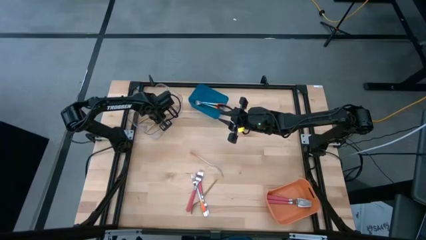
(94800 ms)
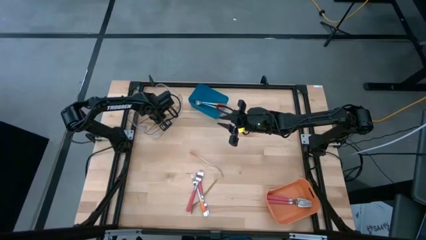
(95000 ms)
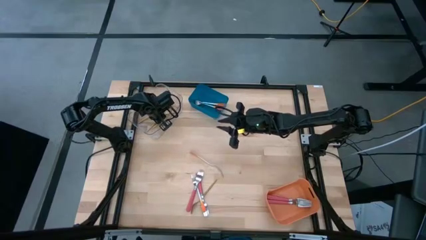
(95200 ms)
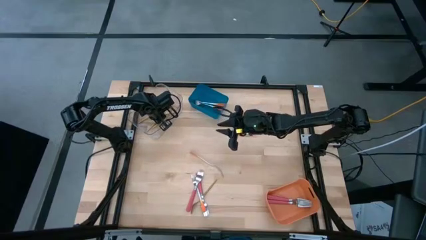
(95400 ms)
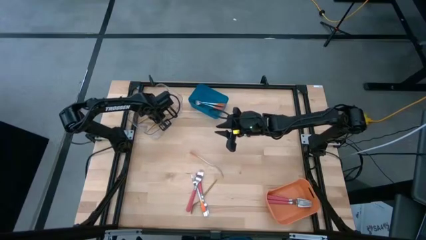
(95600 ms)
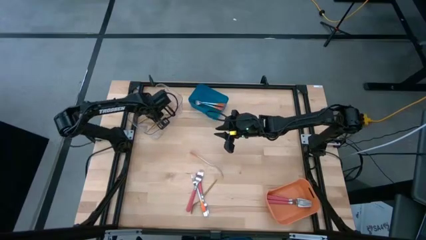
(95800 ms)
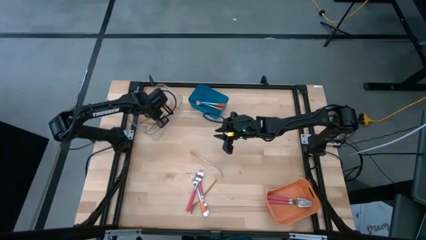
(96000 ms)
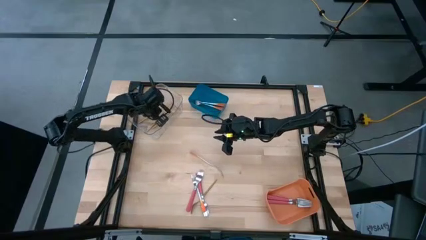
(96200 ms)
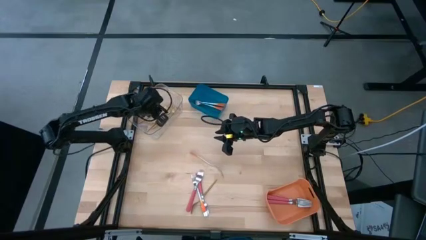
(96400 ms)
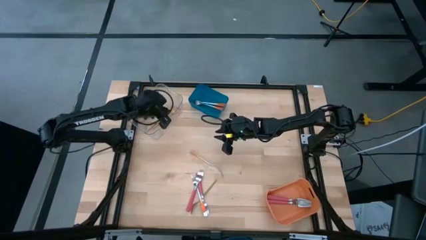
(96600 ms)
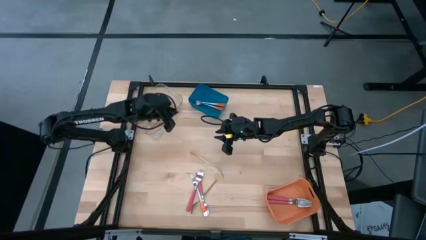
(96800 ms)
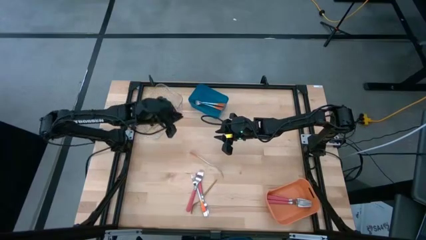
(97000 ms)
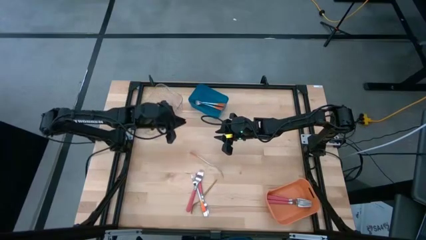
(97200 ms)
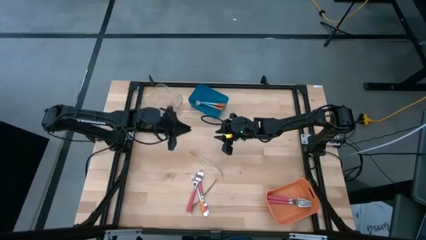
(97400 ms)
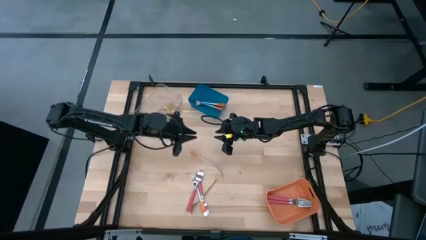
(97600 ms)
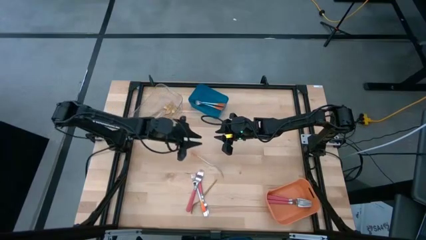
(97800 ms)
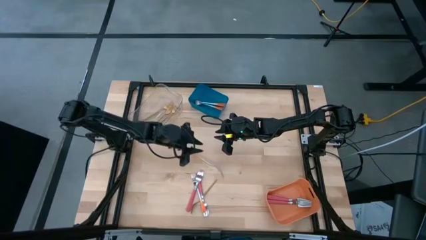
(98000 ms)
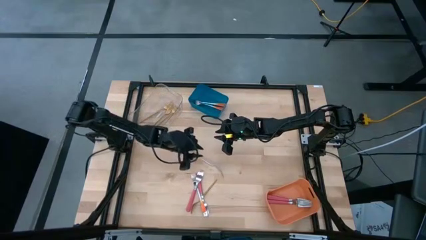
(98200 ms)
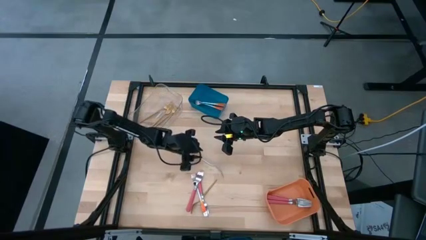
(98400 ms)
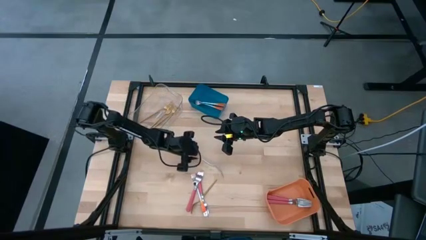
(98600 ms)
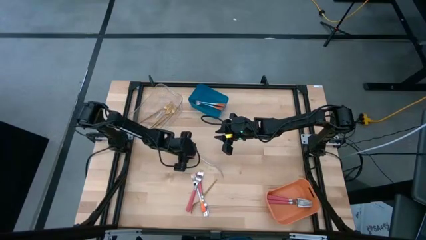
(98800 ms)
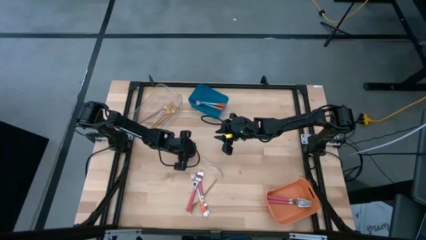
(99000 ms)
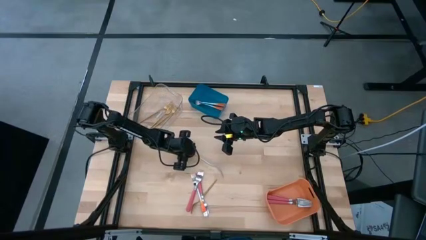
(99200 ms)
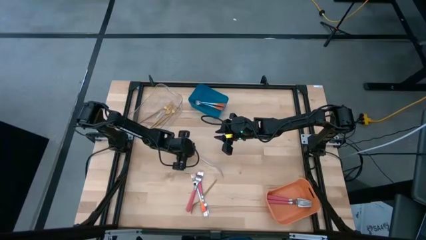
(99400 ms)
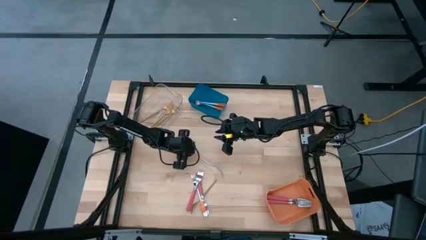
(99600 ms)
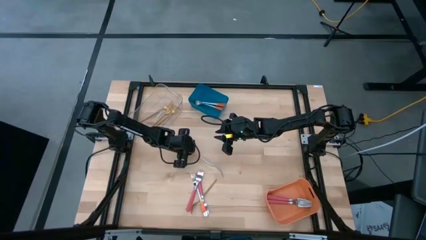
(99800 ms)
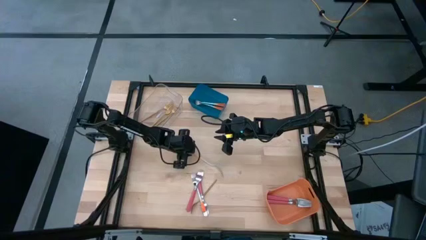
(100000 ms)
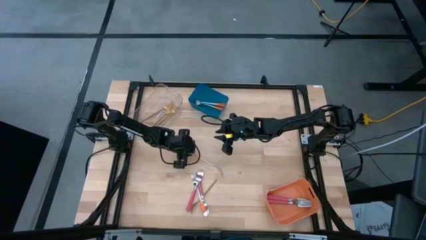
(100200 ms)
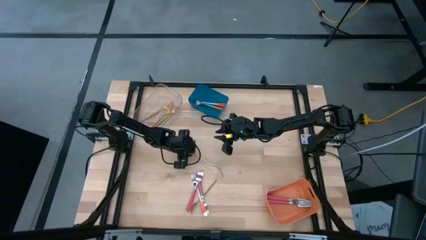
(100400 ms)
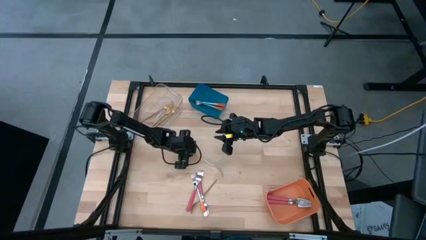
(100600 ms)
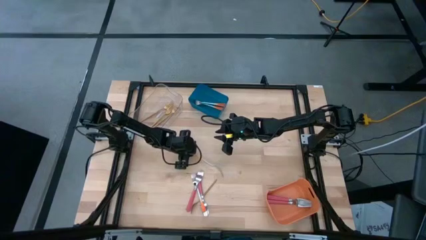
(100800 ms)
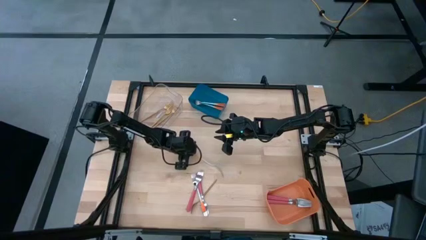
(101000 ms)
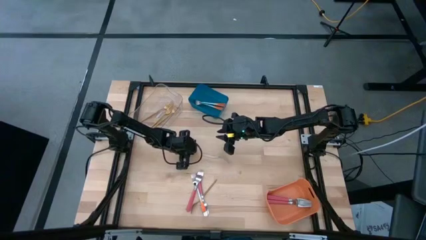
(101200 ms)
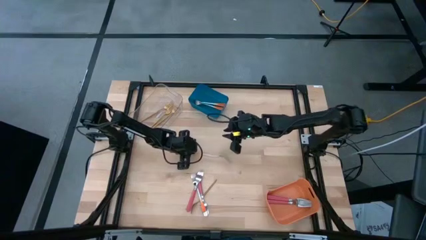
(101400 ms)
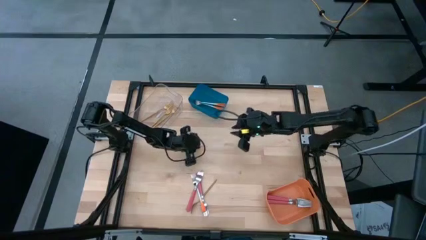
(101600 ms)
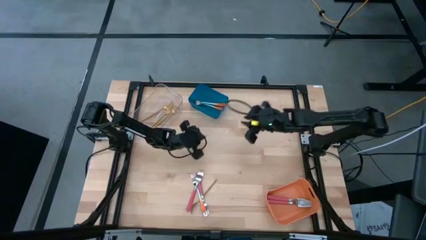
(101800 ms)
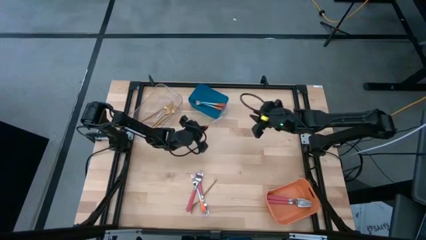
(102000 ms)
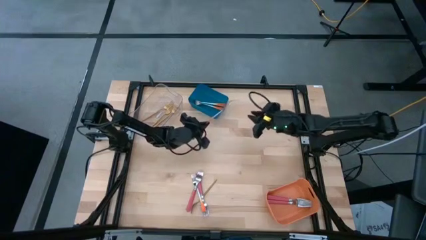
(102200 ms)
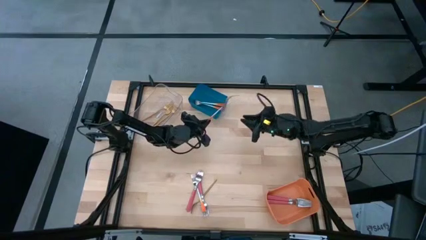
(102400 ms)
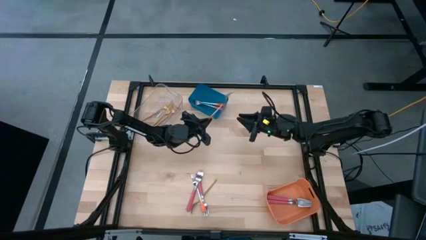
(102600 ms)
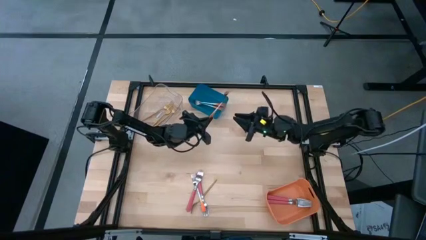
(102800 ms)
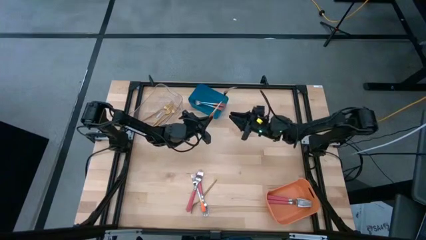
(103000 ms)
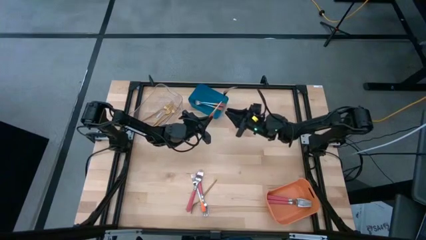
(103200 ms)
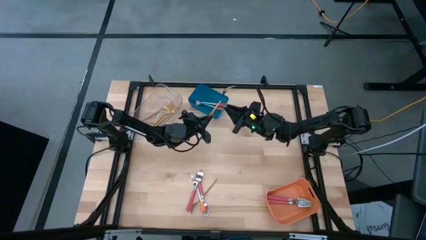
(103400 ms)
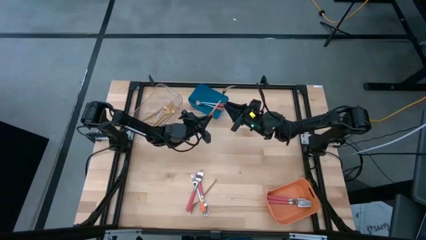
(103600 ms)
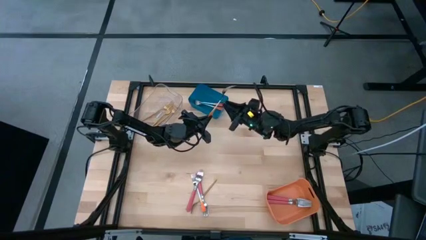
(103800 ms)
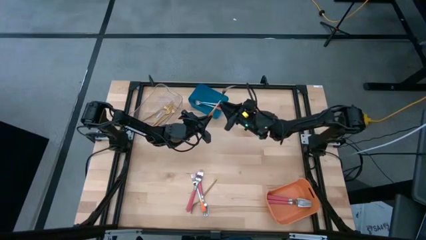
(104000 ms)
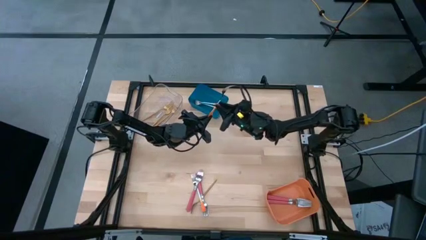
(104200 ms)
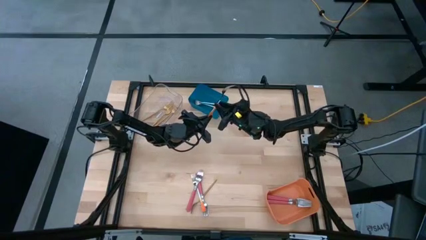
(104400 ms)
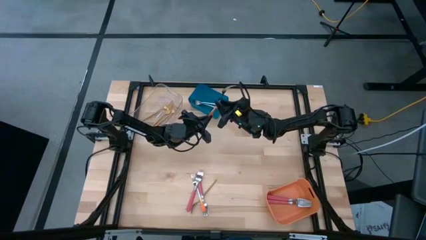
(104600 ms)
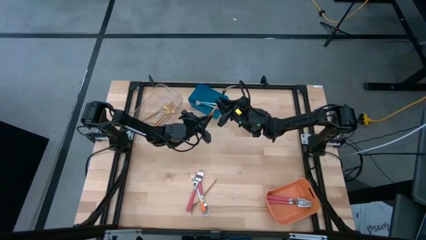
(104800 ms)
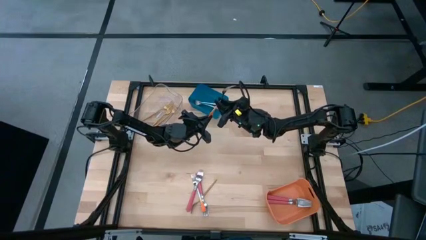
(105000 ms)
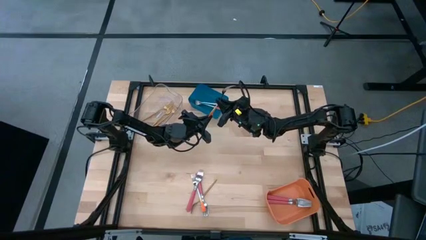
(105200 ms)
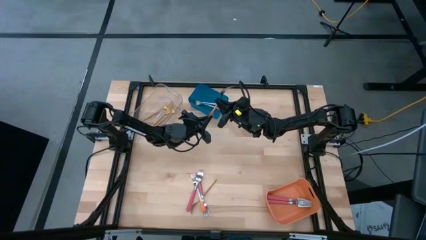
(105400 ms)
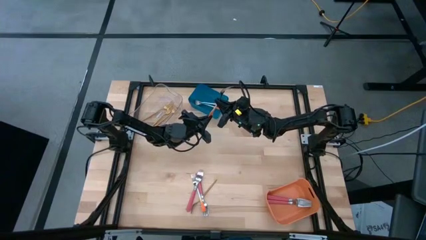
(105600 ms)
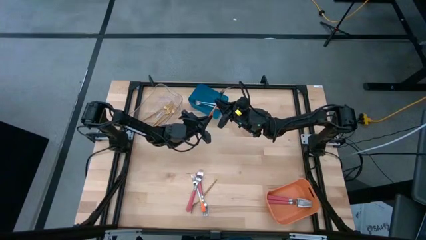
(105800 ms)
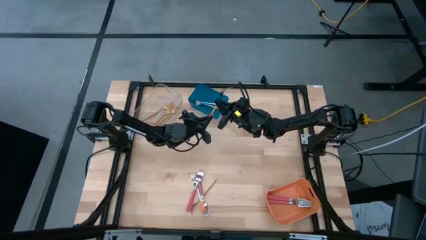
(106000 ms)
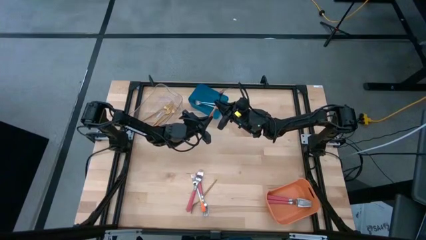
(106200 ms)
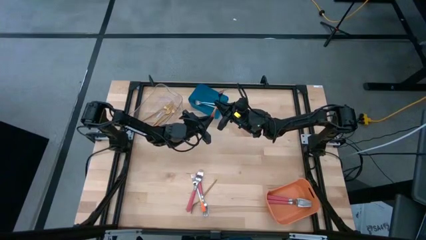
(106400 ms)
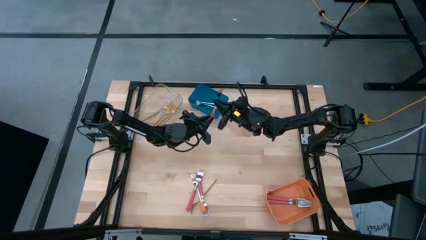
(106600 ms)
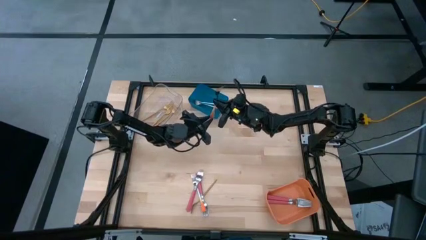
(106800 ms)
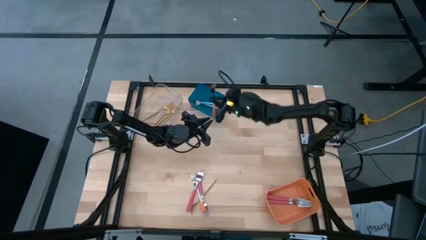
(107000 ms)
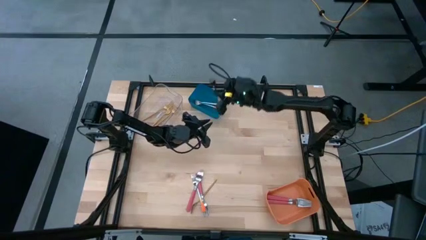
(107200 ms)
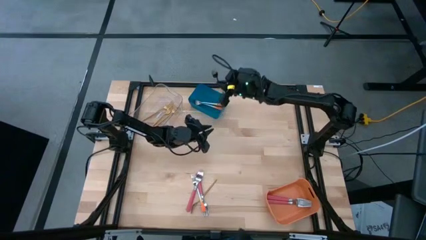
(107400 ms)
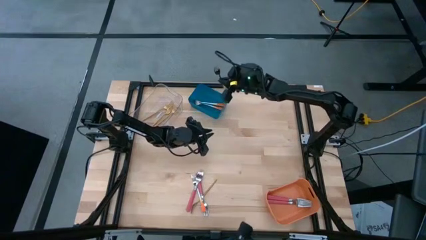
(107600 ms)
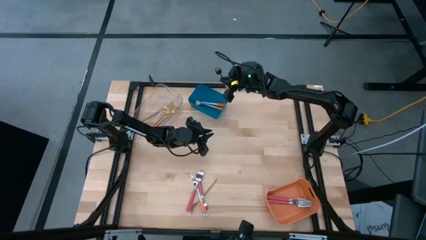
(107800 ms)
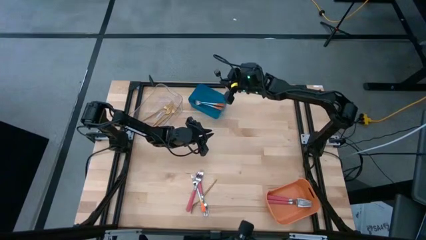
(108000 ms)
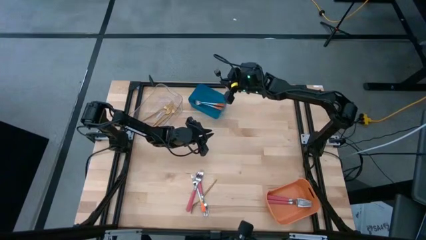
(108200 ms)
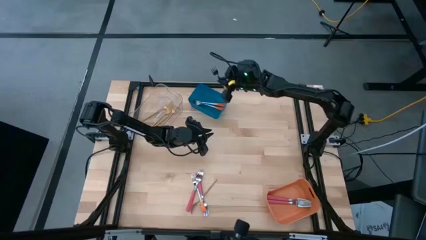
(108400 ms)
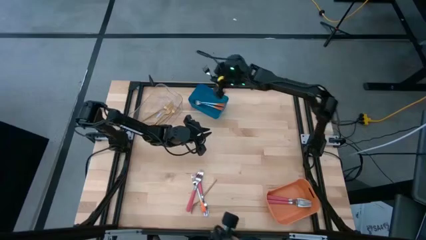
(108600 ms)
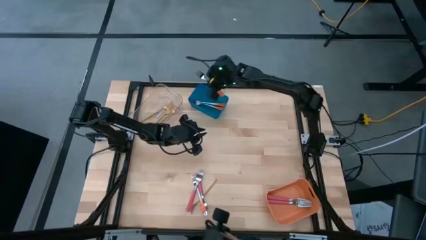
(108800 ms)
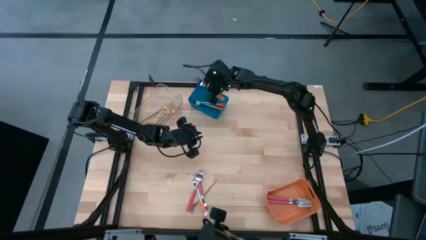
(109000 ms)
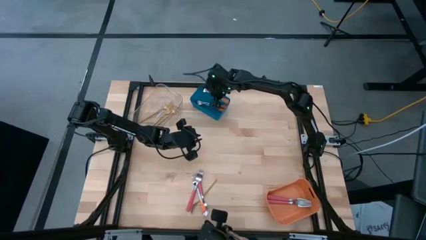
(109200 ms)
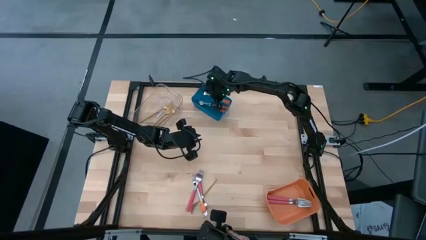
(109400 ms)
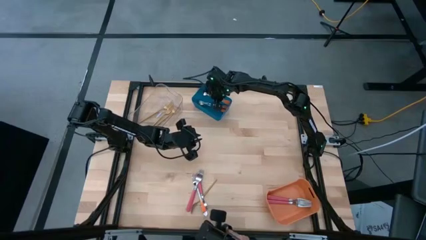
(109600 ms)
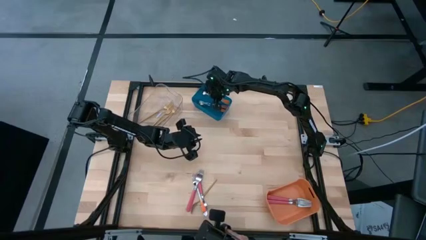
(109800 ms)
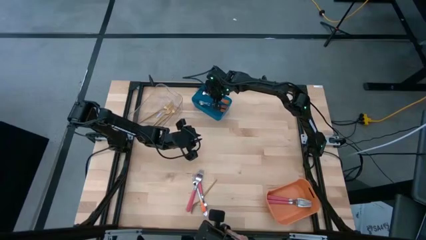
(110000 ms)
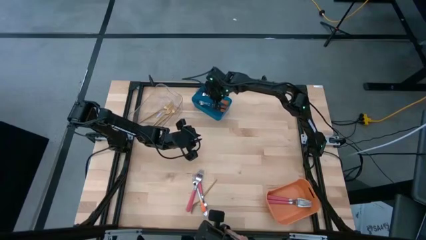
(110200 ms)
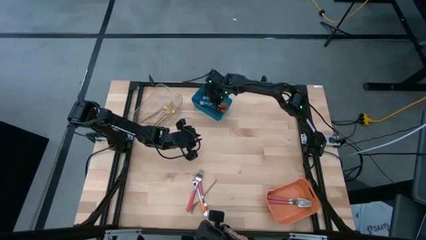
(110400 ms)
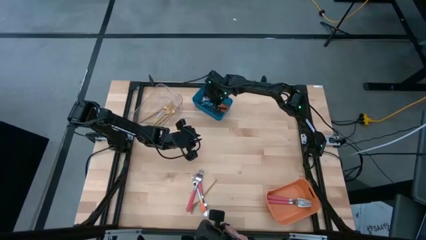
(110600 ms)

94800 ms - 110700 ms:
Task: Sort silverware by color (type)
Put the orange fork into the blue bin
